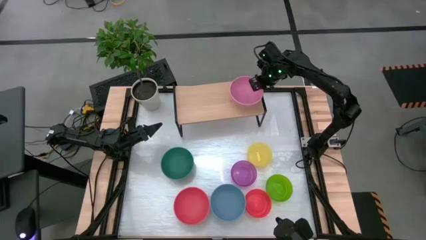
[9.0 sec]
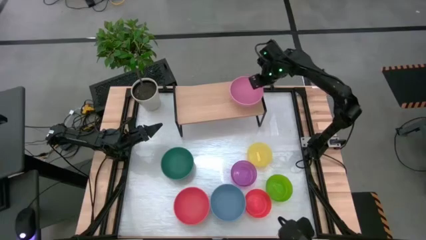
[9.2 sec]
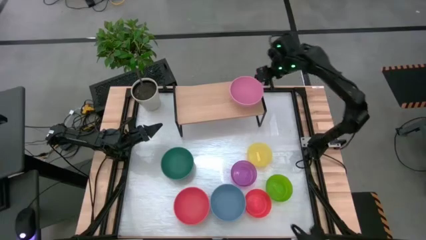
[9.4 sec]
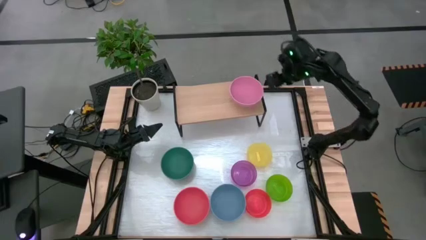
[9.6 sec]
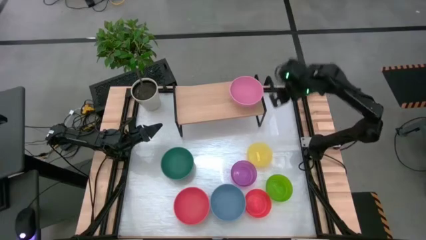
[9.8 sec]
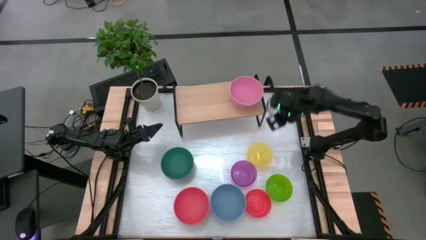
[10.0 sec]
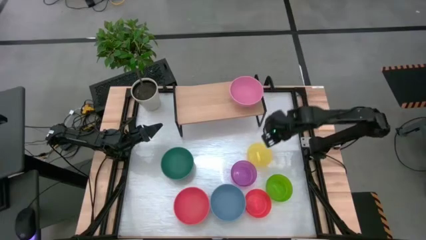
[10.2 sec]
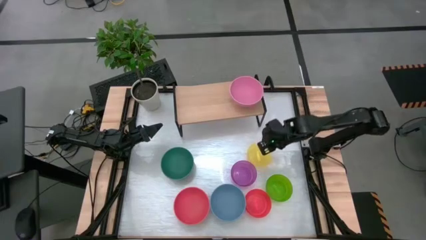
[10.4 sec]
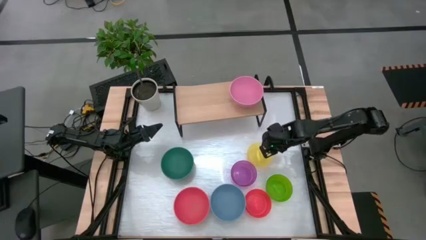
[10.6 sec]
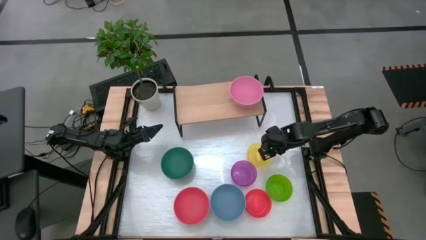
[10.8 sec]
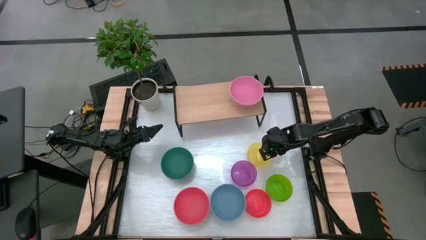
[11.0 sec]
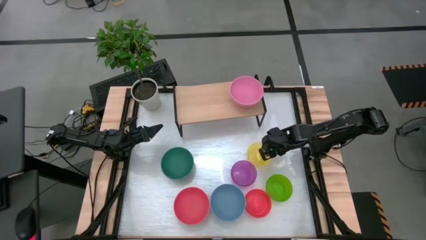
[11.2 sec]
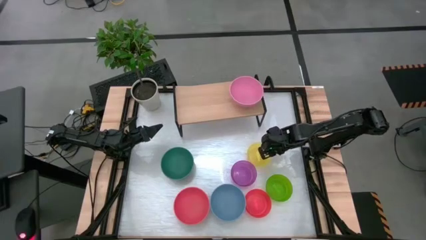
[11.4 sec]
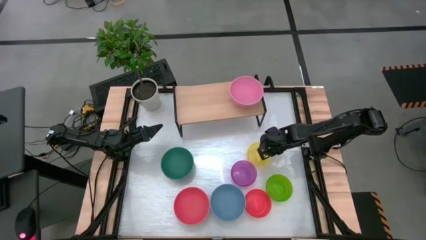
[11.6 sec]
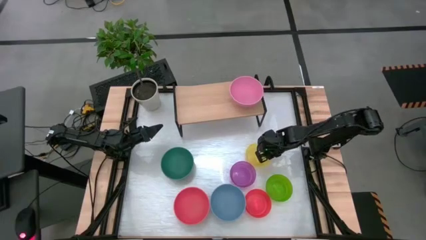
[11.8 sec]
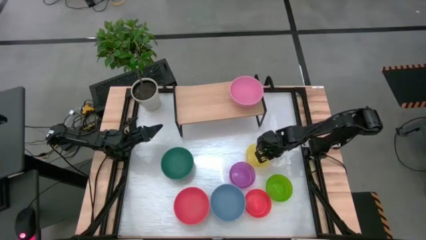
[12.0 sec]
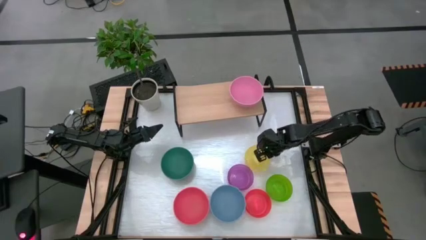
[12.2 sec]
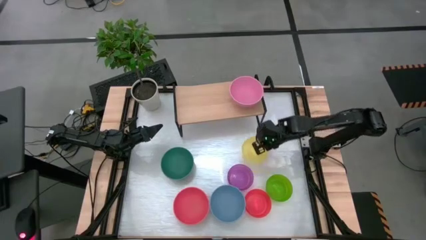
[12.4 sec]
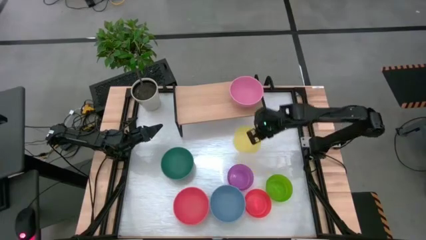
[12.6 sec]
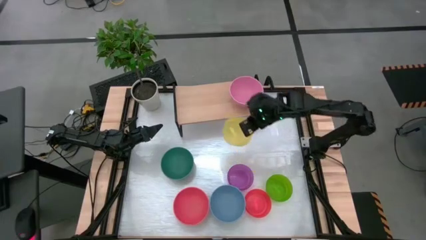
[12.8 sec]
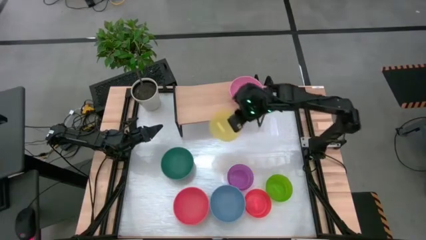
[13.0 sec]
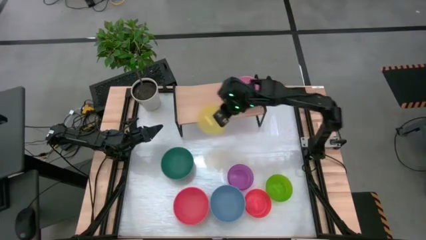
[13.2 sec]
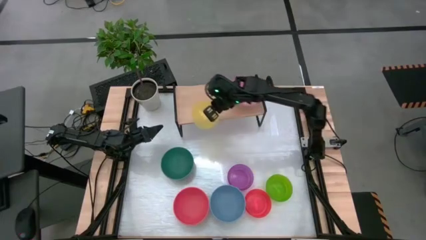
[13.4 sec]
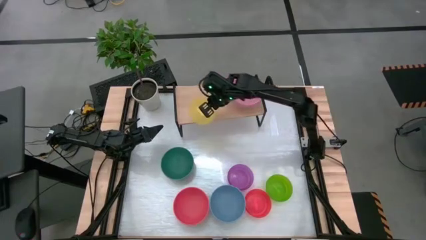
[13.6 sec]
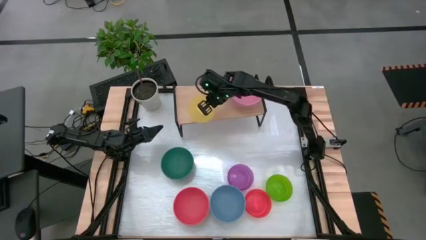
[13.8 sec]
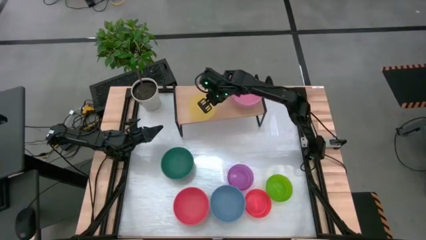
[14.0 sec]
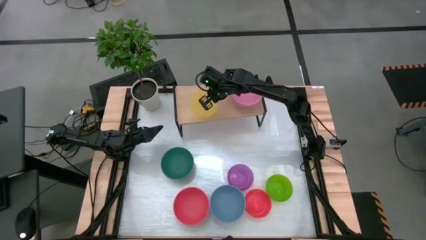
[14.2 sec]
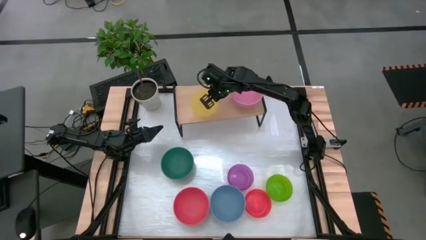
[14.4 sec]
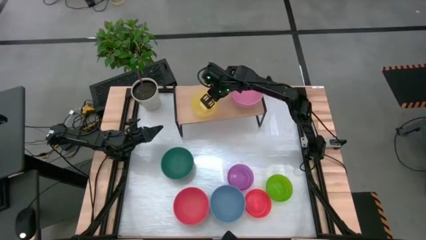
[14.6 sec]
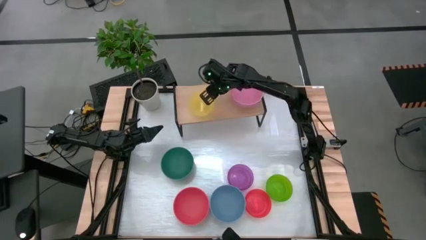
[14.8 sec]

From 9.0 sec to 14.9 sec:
Task: Place and stack bowls onto a shelf
Put the yellow bowl on the shelf

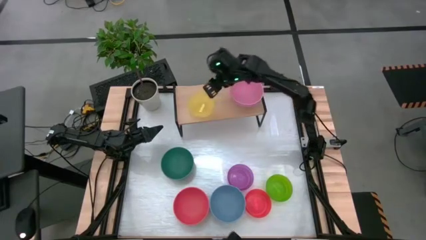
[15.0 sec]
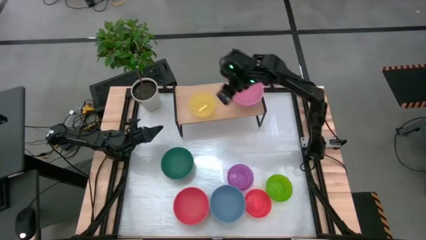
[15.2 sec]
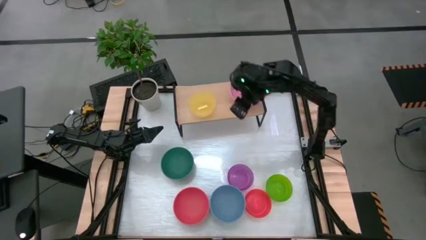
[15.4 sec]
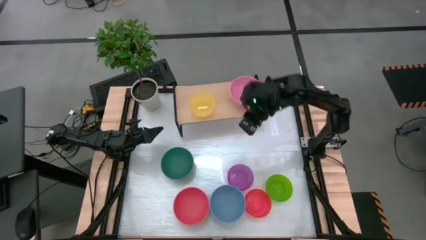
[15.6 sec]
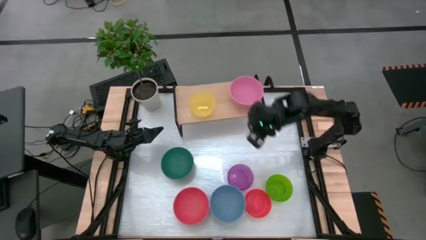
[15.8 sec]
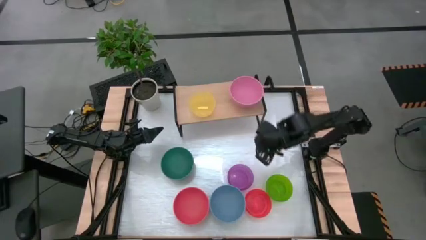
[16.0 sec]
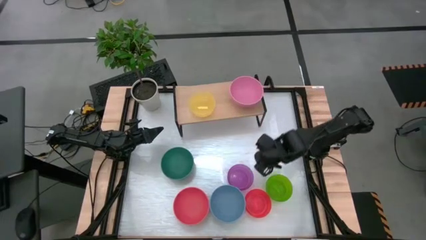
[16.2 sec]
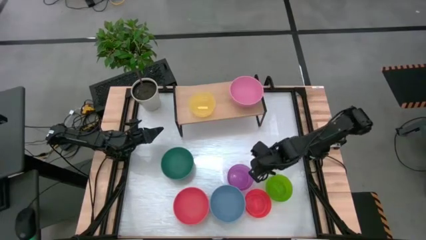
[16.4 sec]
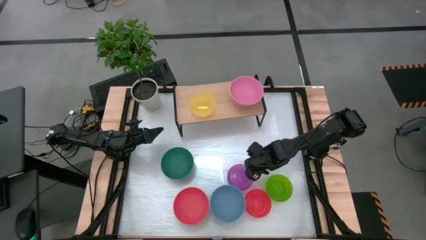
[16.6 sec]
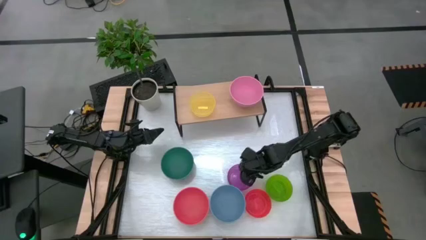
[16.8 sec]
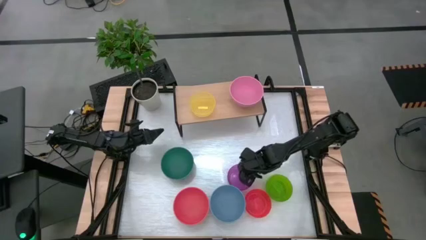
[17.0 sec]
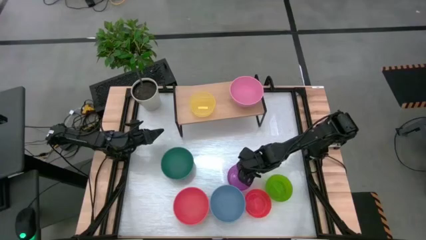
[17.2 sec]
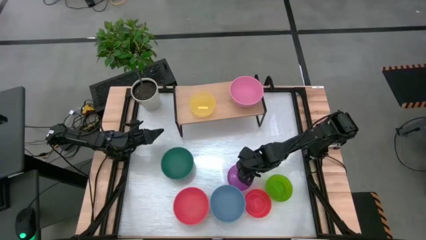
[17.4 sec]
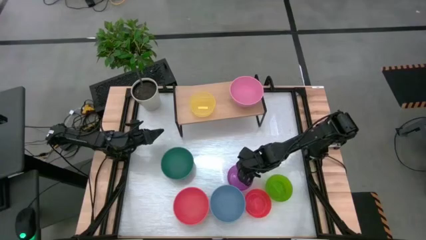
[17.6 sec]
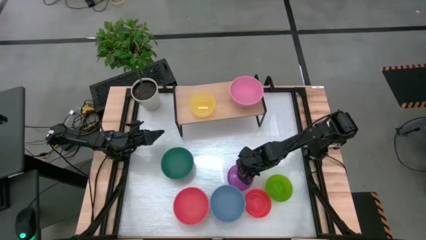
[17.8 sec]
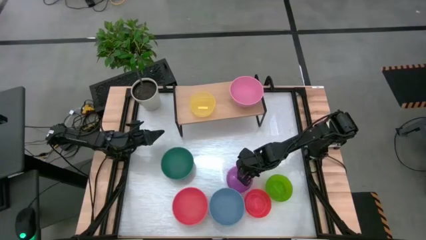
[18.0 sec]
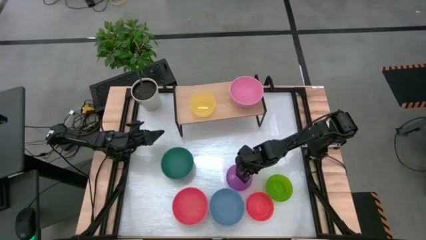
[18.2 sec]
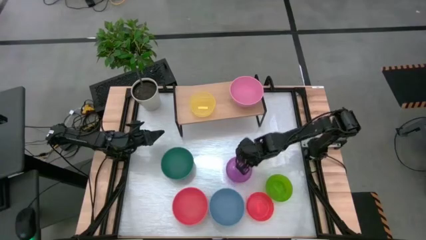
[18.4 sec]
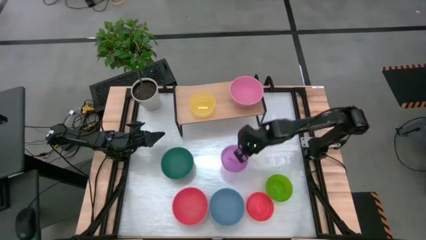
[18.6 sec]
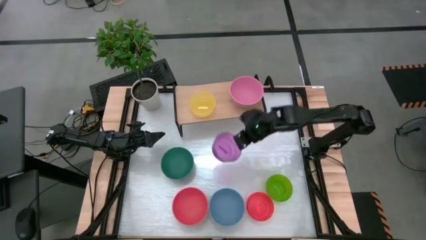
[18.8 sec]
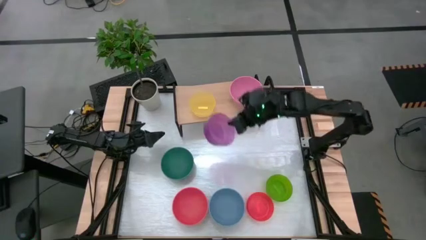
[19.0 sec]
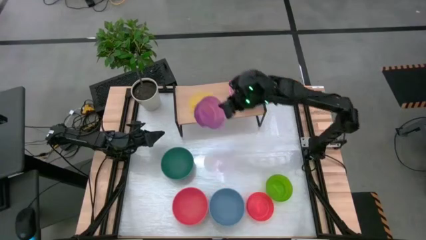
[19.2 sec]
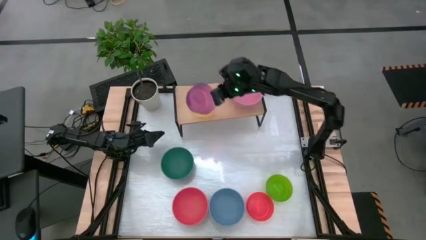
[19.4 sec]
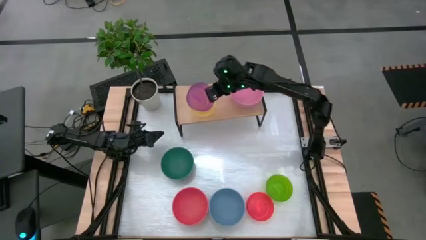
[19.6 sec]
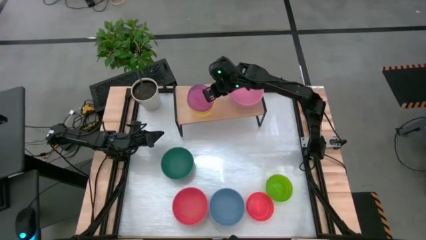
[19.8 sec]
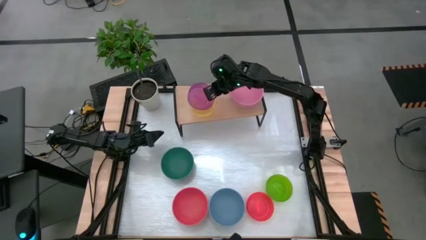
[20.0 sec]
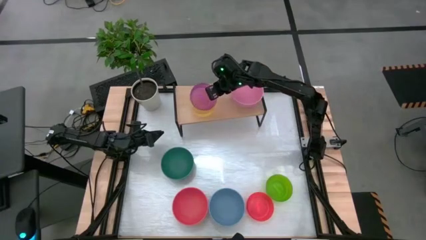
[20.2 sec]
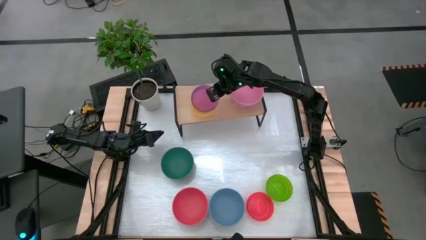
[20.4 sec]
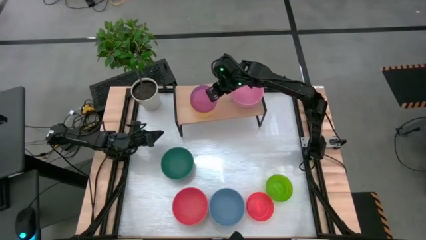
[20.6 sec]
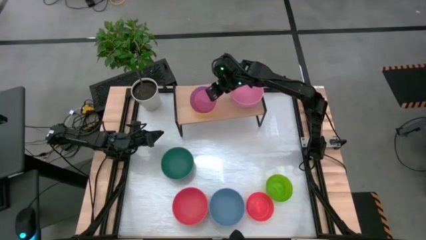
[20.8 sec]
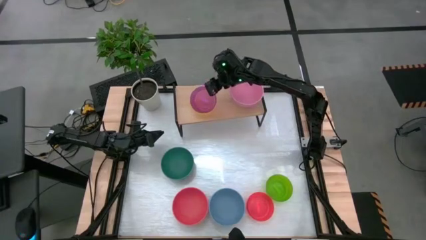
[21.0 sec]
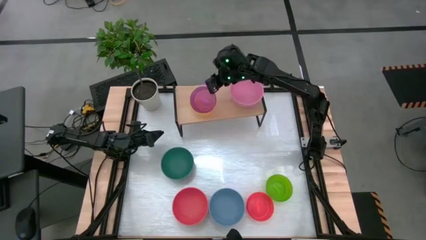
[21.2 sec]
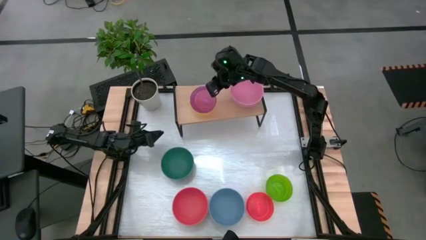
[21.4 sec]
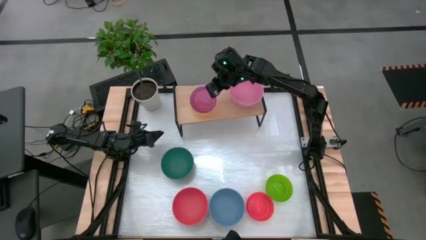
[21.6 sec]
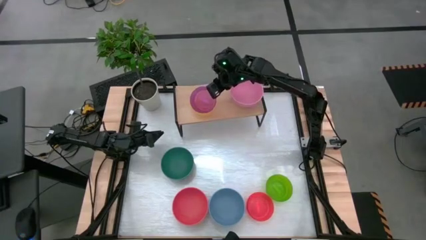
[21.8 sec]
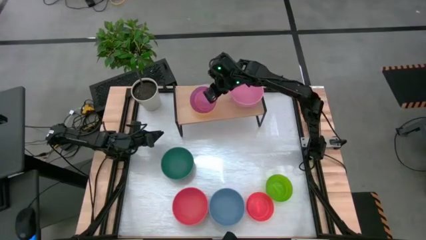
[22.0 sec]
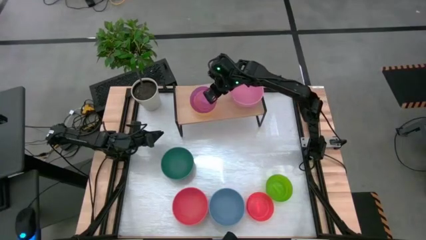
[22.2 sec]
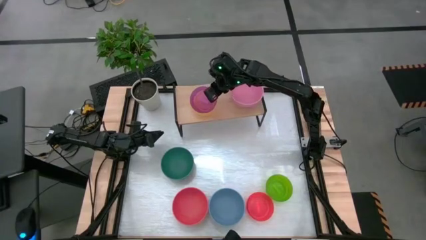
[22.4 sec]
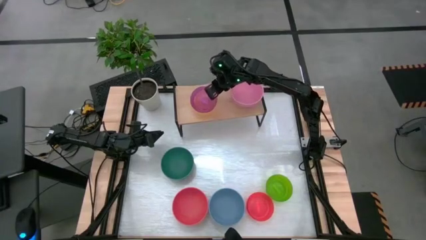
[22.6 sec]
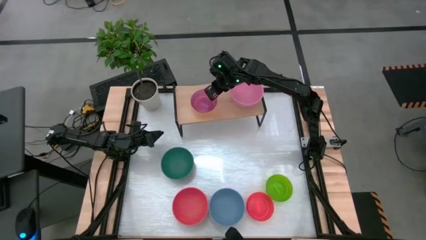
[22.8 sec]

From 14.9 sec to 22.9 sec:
Stack the violet bowl on top of the yellow bowl on the shelf

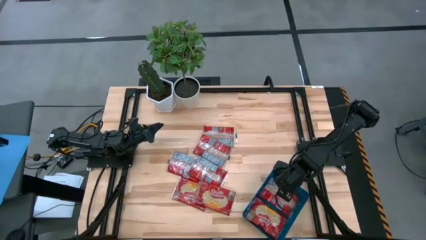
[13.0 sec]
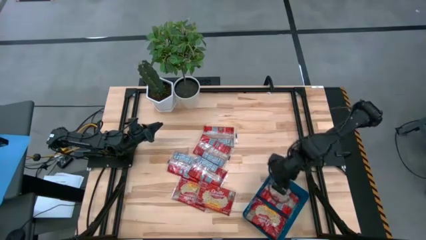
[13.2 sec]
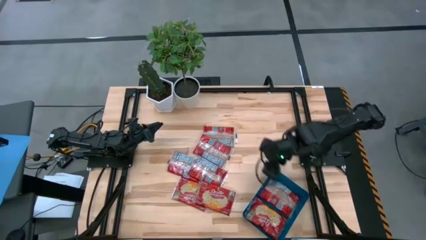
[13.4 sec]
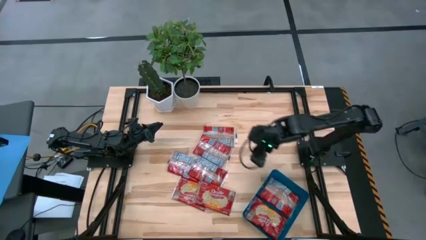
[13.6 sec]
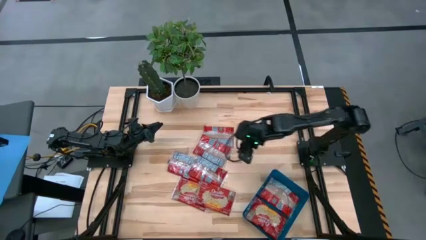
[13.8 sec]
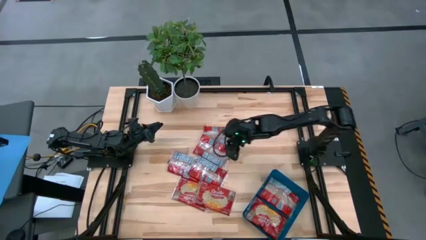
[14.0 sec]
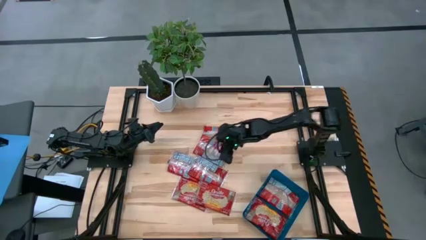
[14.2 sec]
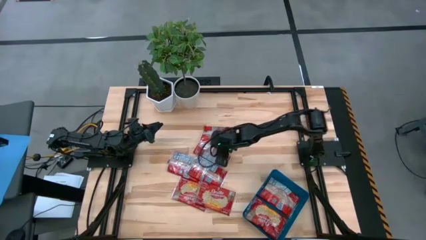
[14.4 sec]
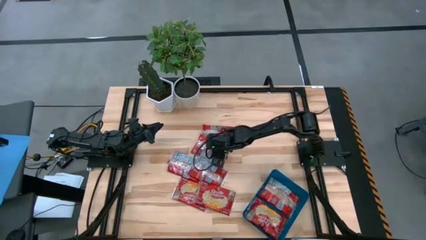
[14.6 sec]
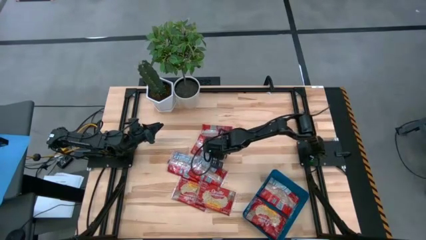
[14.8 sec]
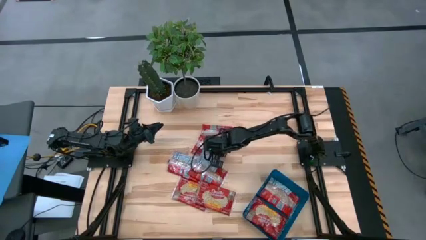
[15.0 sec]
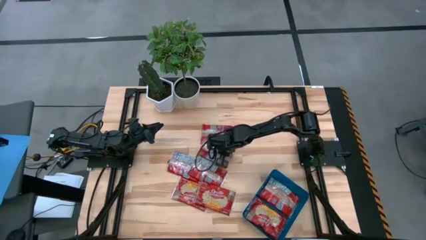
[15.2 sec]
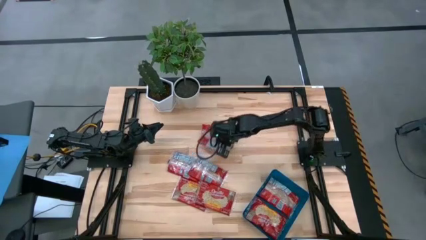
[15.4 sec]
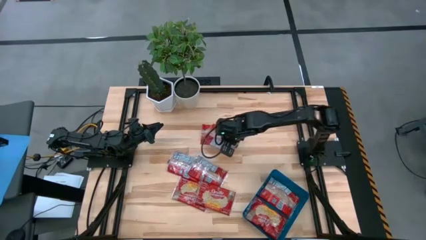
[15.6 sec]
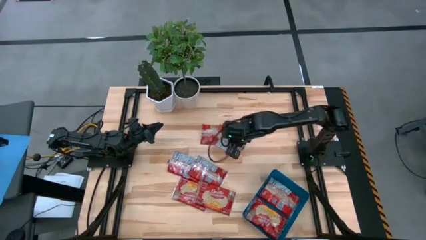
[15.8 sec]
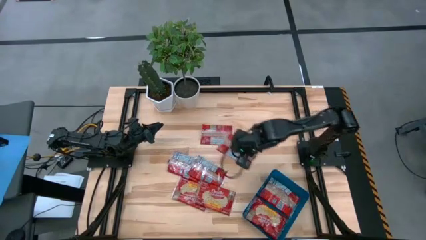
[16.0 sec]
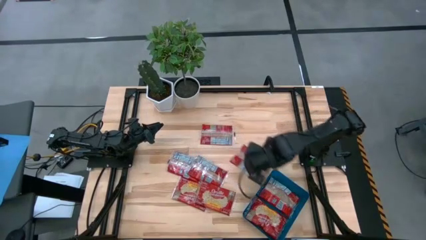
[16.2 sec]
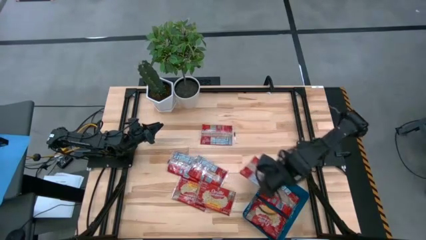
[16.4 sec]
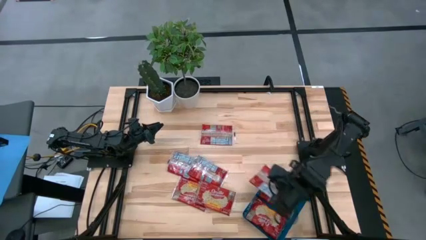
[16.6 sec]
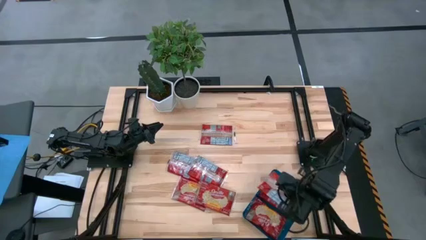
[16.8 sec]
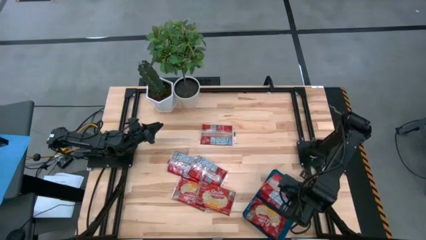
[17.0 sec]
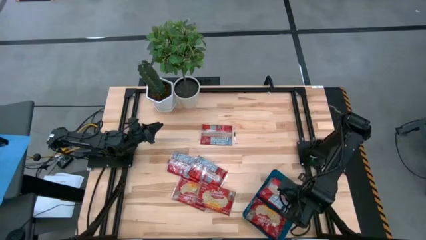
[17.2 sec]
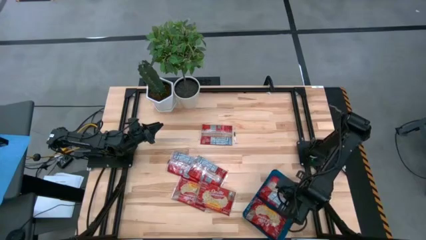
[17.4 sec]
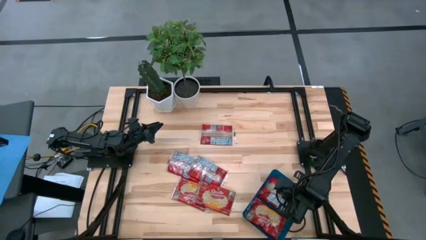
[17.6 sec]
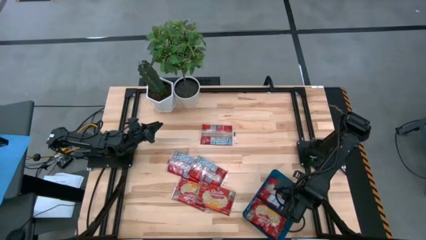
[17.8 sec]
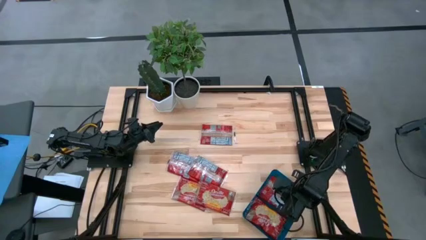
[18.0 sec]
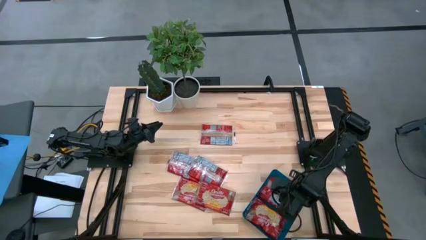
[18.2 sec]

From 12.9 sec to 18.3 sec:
Task: Sort popcorn bags into baskets
Put the red popcorn bag into the blue bin
